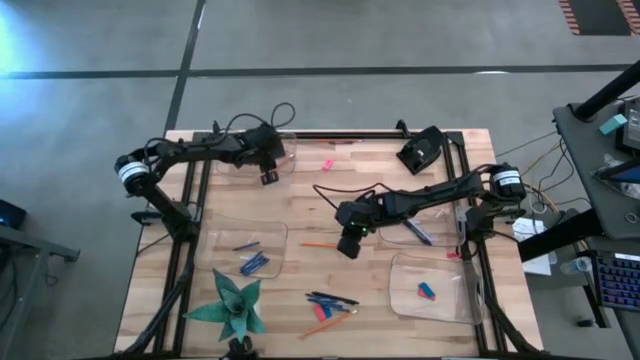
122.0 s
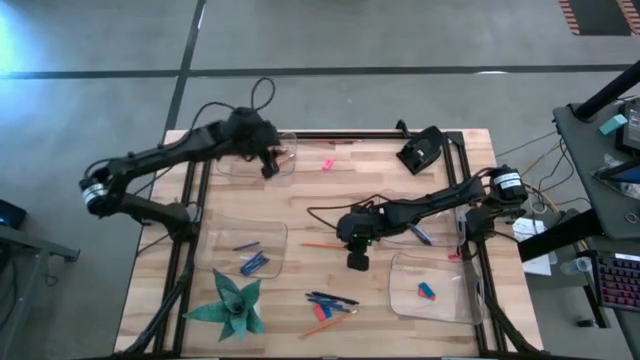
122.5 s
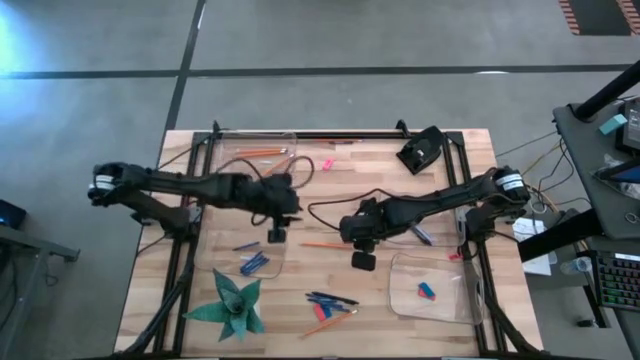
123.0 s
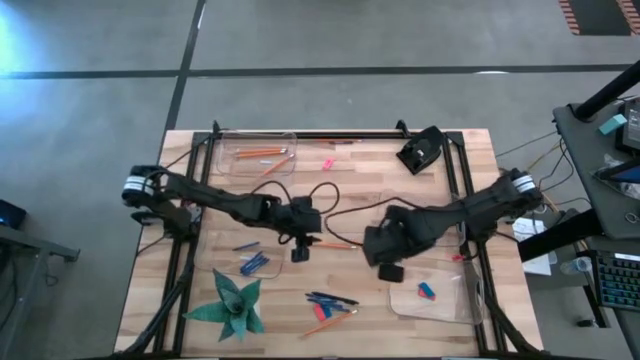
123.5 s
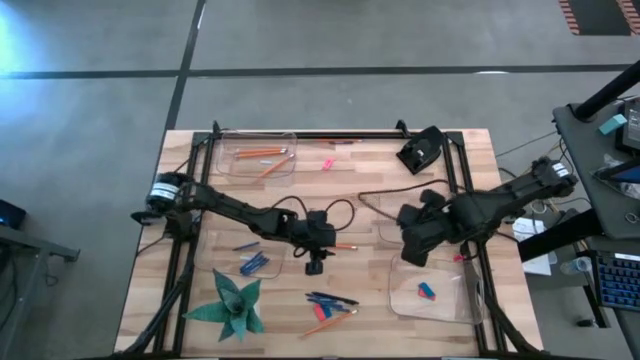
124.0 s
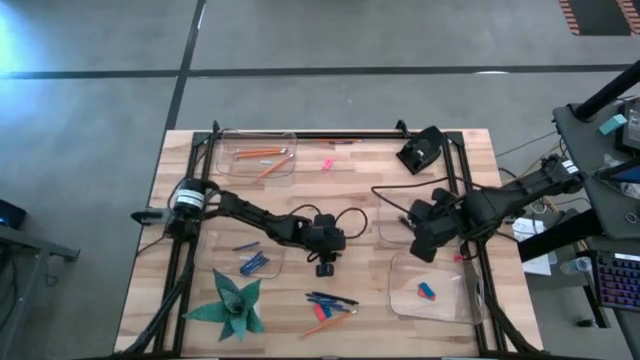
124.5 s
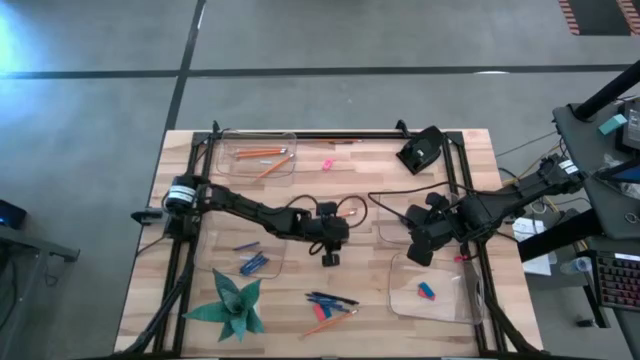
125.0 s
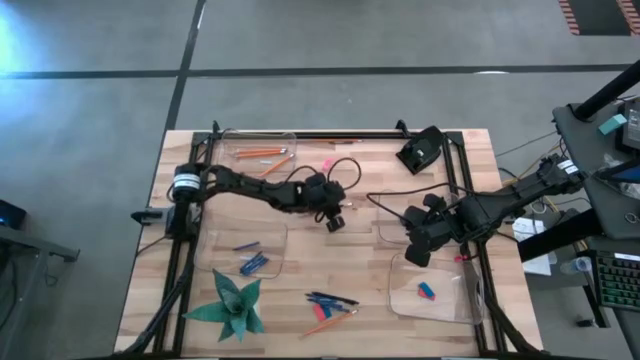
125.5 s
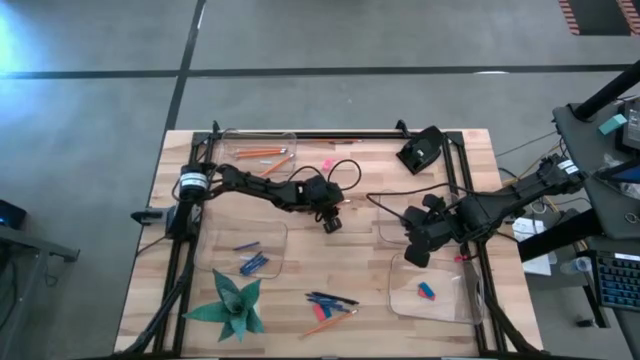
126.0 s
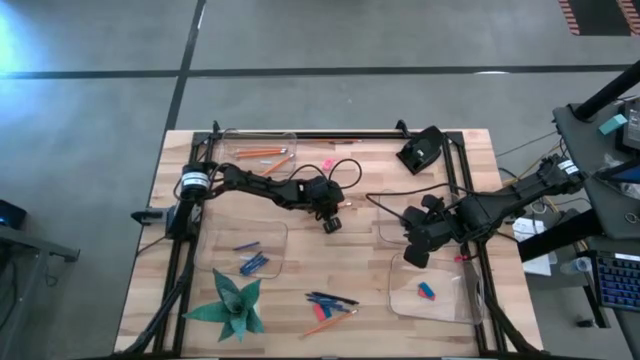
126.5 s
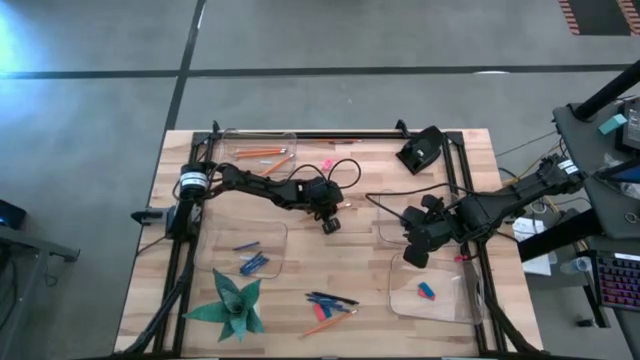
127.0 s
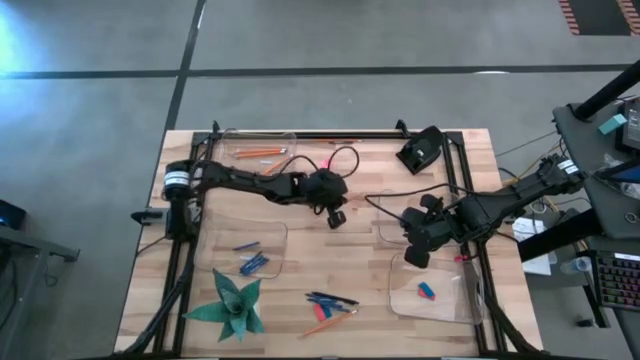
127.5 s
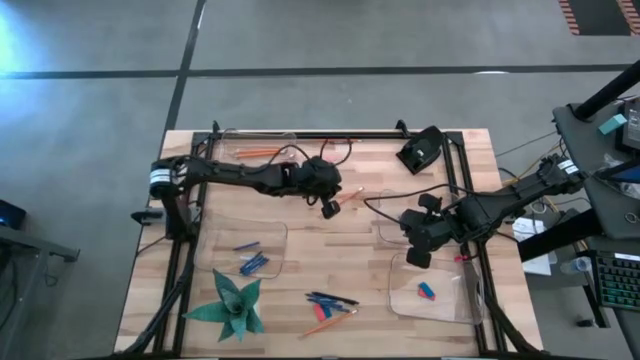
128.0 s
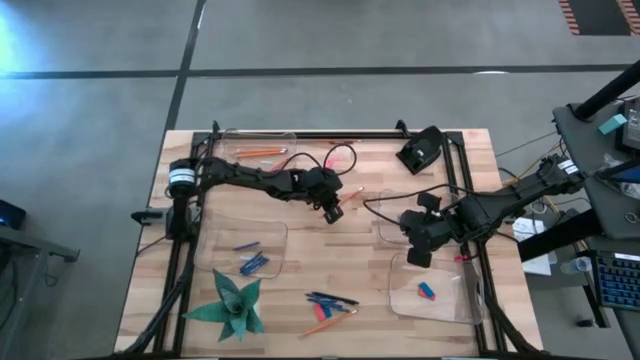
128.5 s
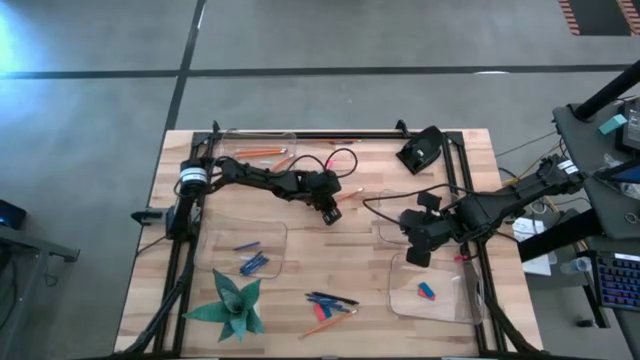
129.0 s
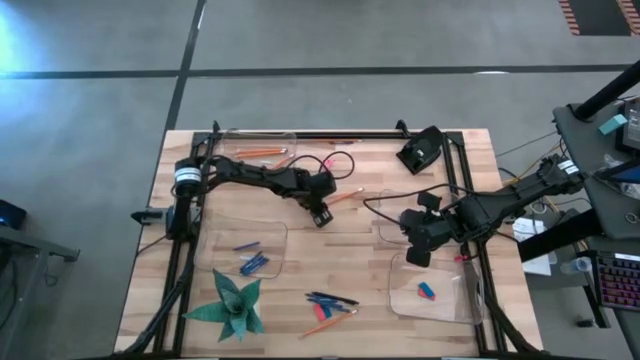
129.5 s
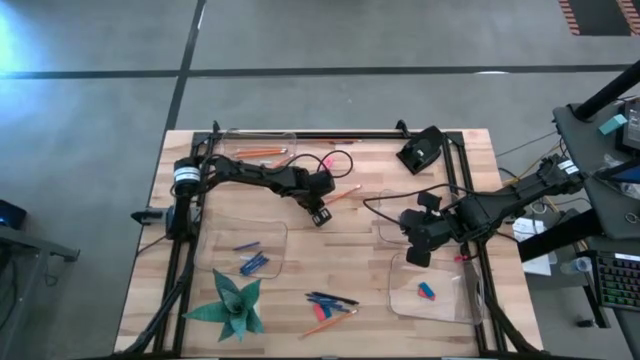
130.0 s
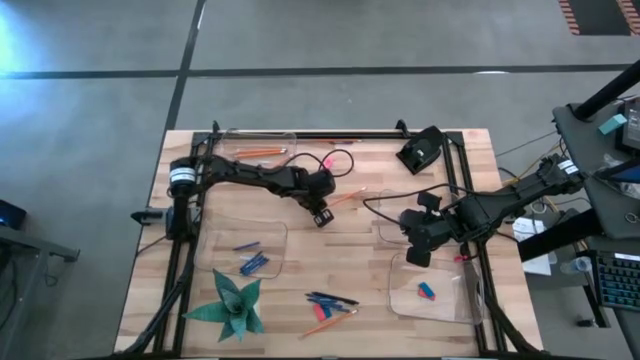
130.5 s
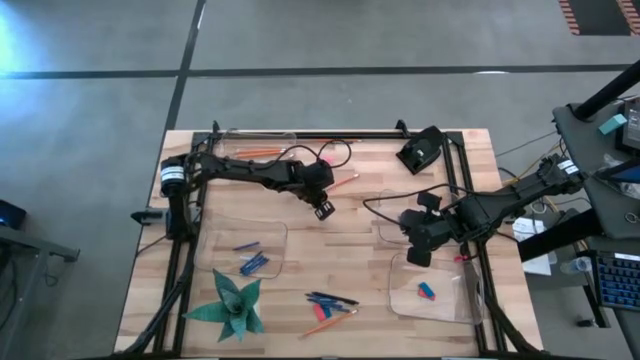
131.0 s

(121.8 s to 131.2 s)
Task: Sort crayons/erasers/pens/pencils in bins
Put the pencil into the top left transparent bin

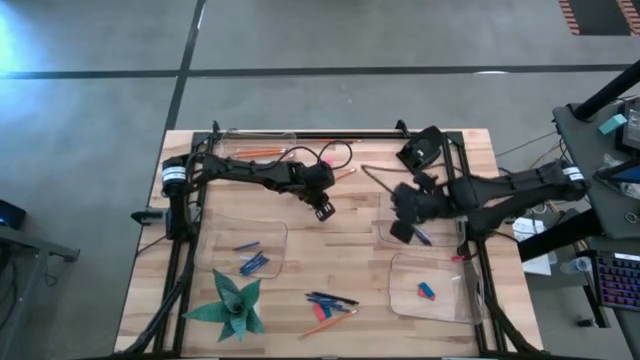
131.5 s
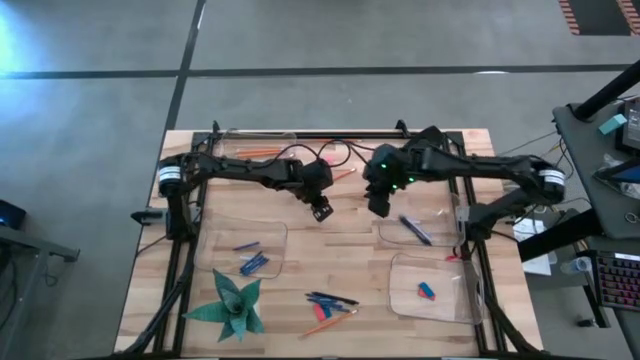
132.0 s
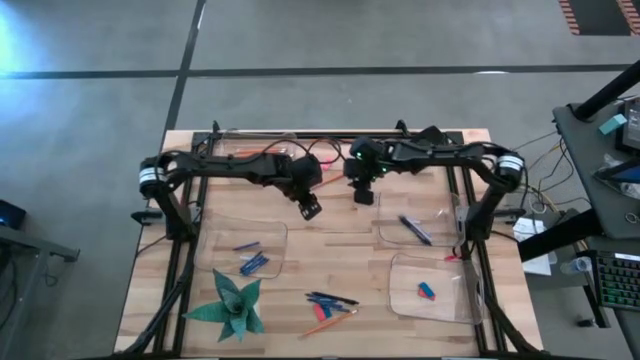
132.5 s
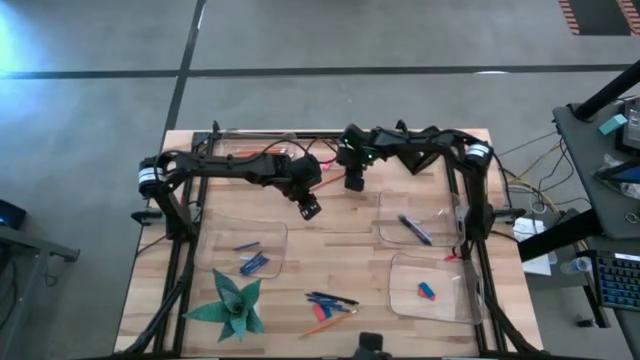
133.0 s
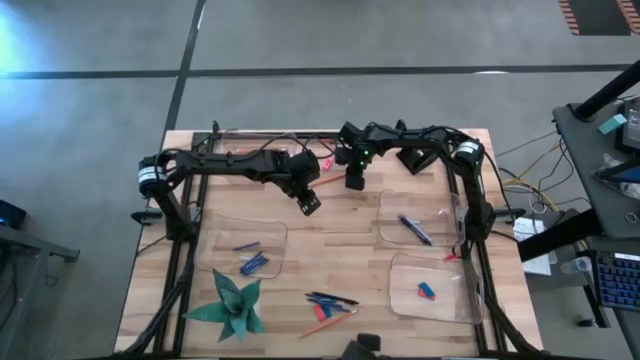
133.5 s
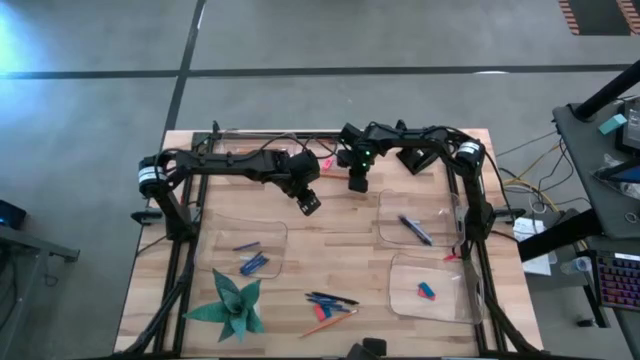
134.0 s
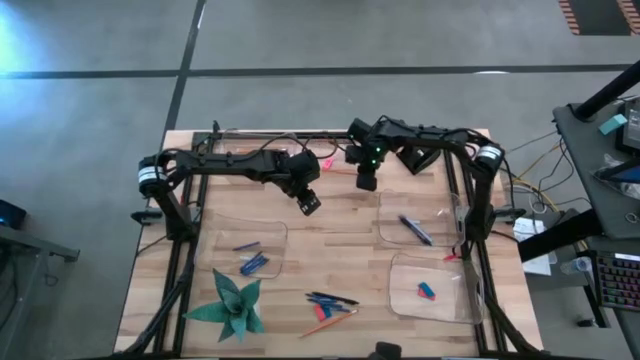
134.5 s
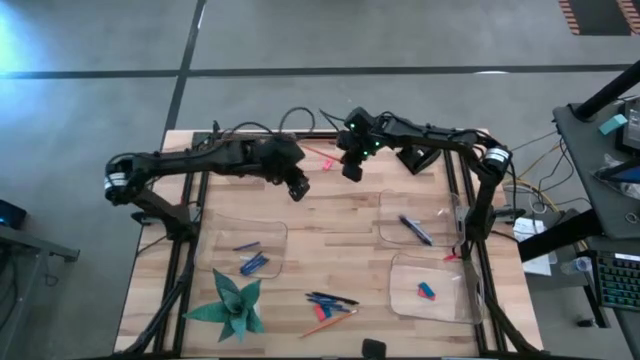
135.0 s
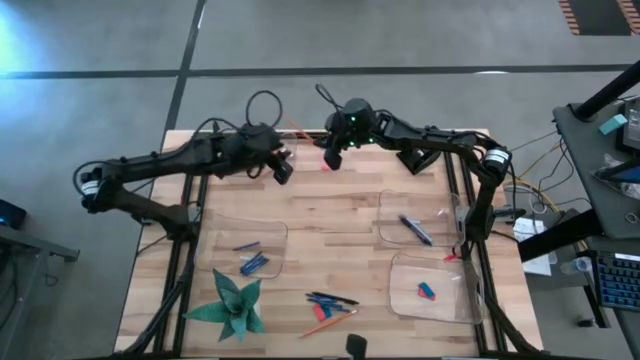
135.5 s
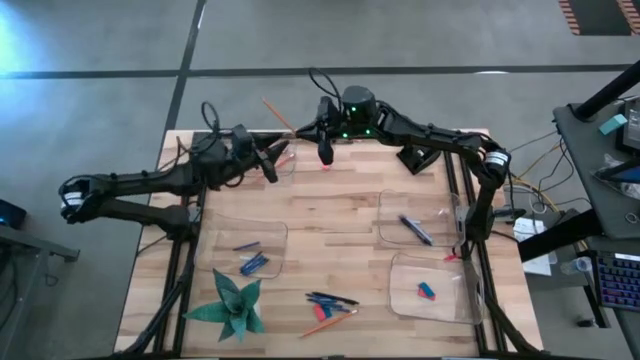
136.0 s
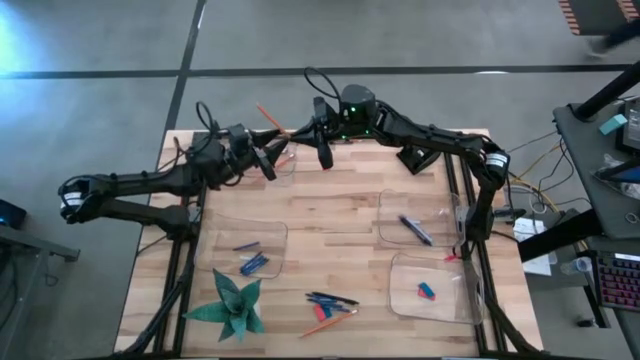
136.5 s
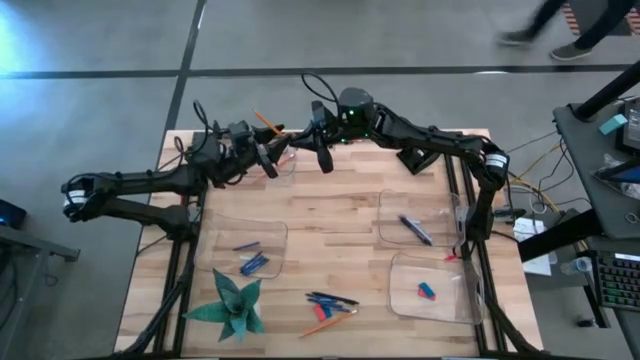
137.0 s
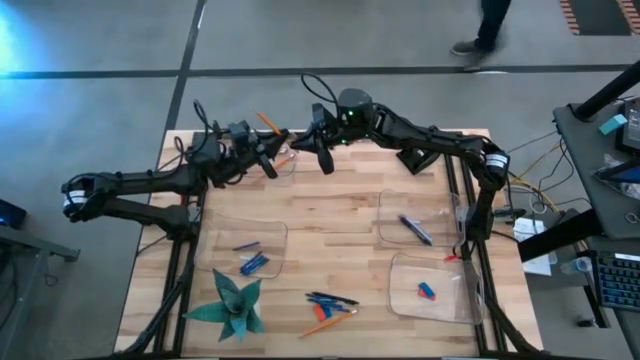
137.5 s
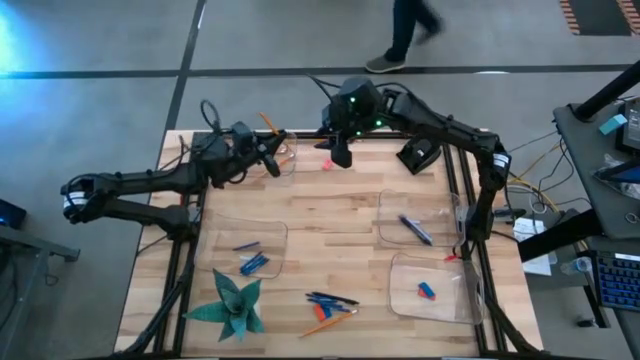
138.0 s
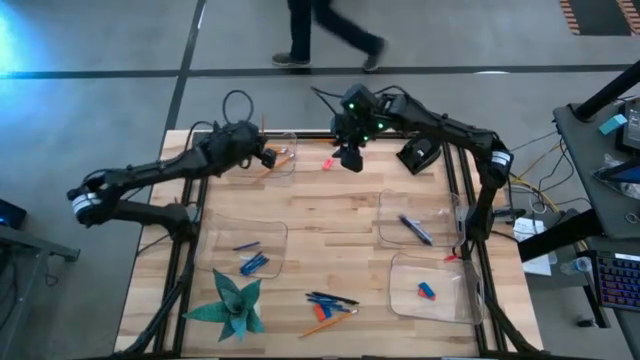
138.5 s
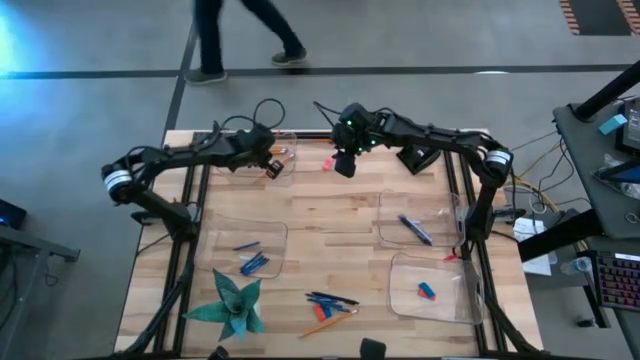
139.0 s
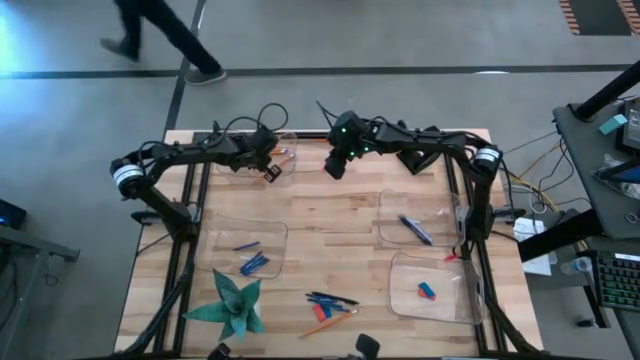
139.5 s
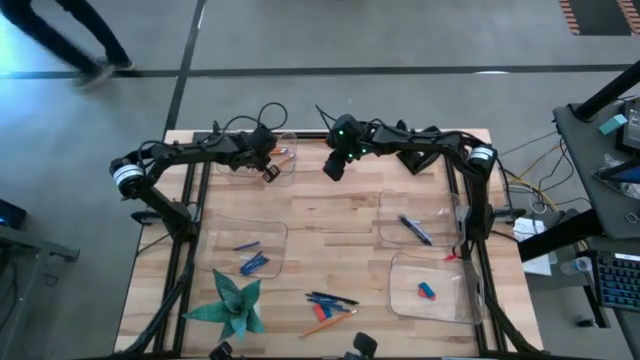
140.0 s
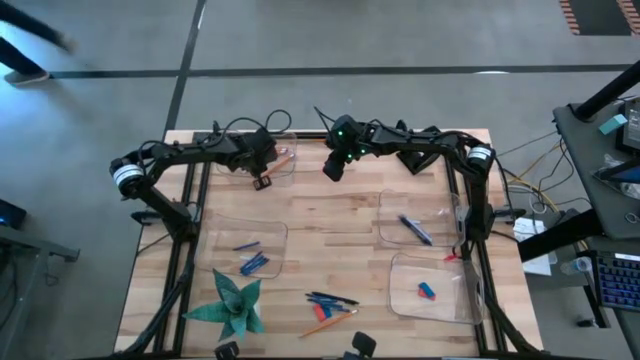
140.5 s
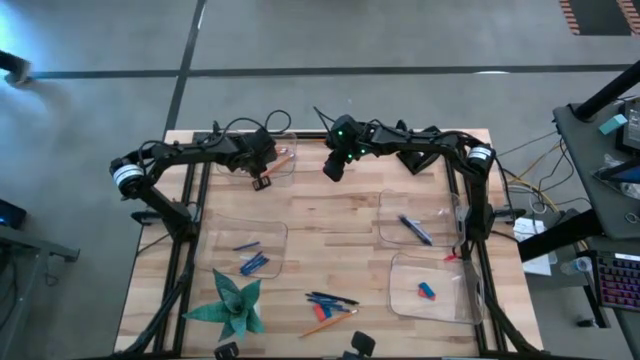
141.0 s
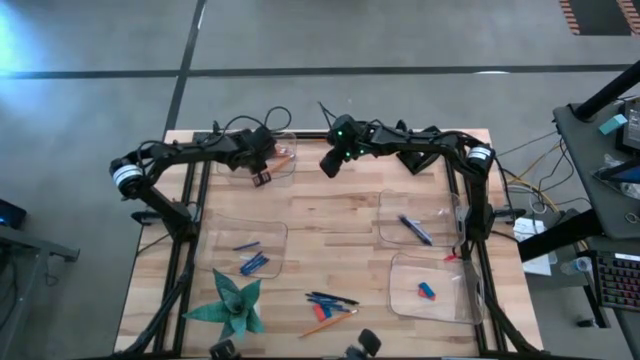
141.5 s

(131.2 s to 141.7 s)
Put the pencil into the top left transparent bin

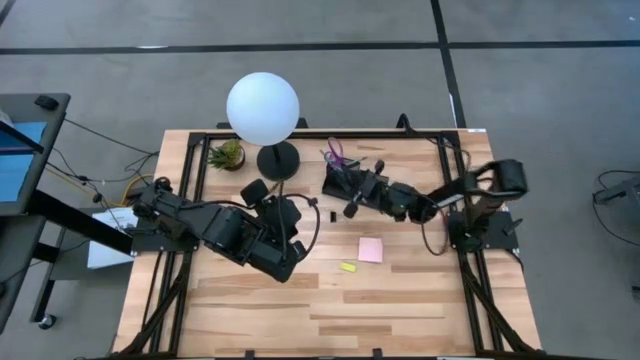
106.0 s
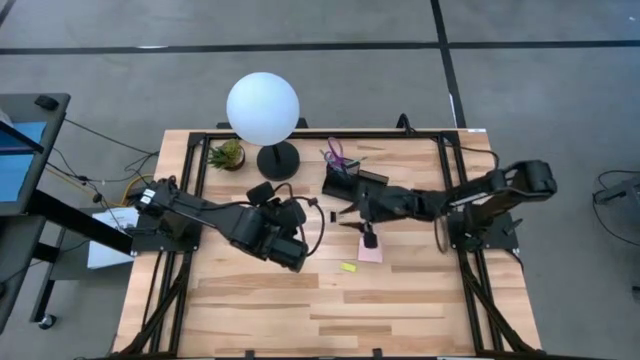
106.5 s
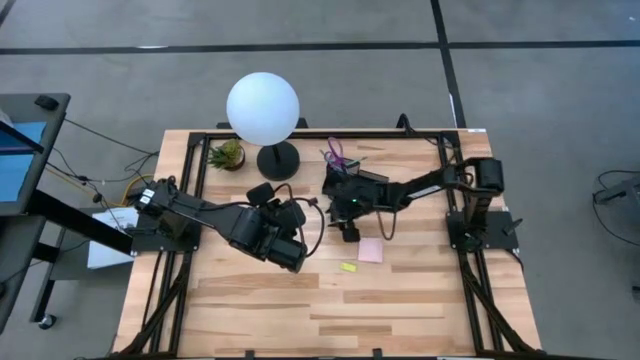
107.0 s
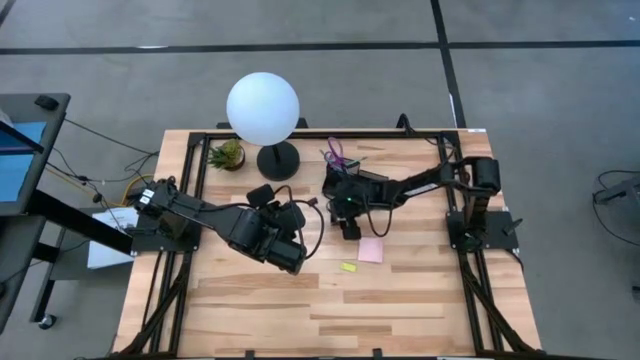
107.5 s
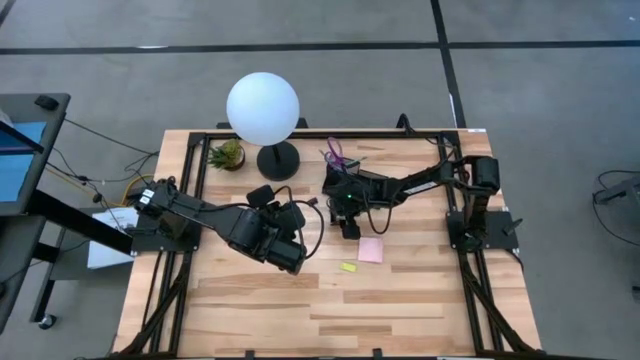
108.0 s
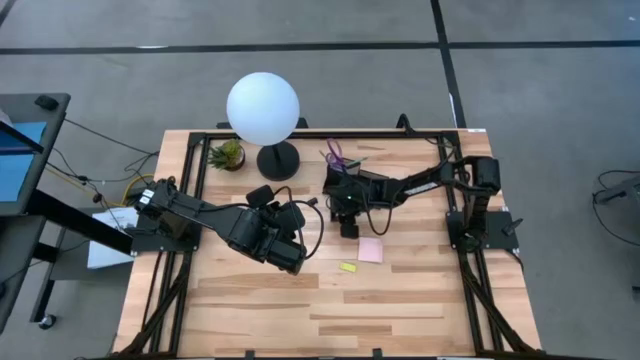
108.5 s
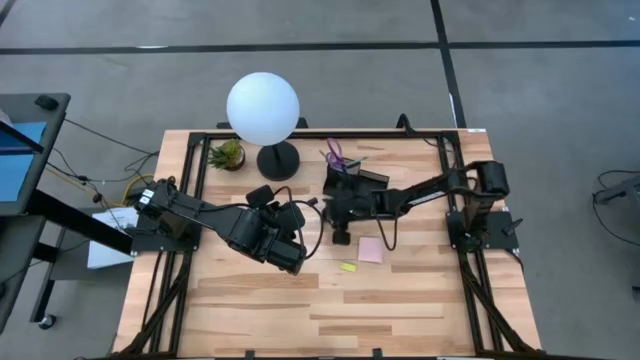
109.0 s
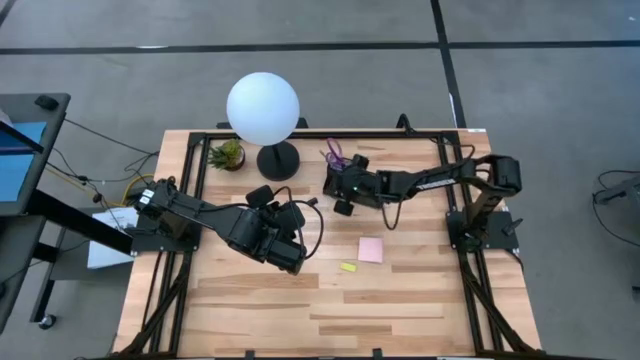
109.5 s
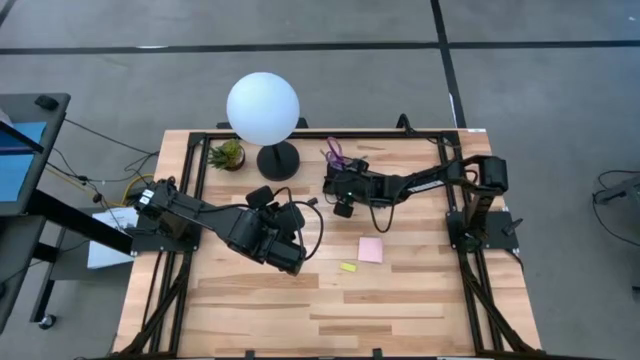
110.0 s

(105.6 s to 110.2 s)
Task: Pick and place office supplies into organizer
Put the black binder clip into the black desk organizer
